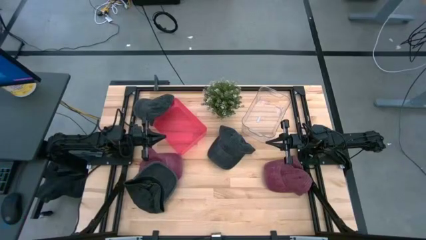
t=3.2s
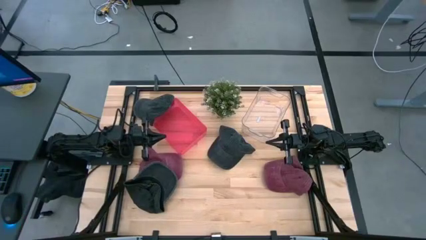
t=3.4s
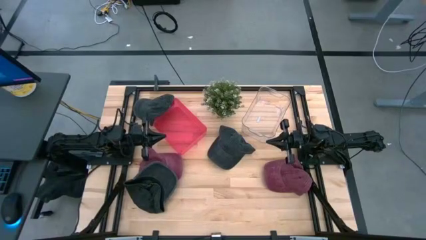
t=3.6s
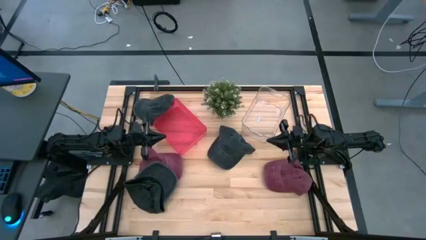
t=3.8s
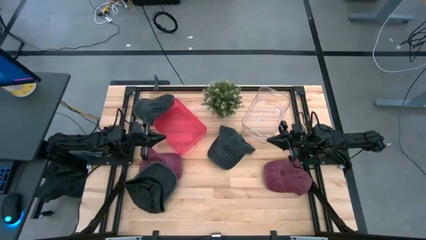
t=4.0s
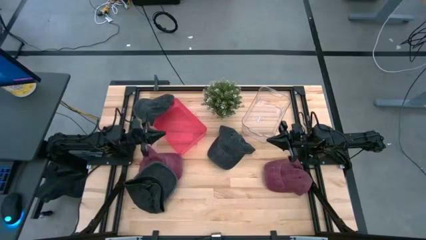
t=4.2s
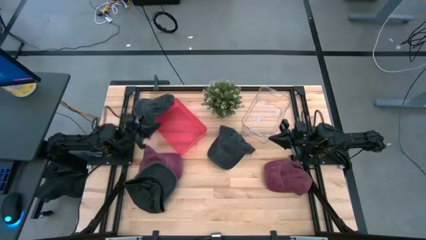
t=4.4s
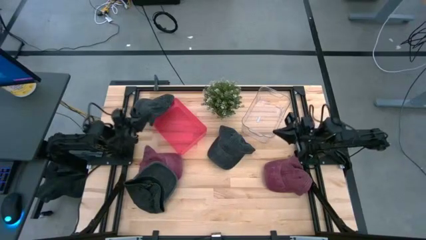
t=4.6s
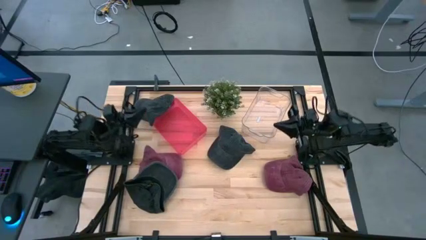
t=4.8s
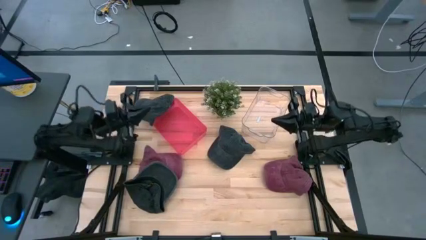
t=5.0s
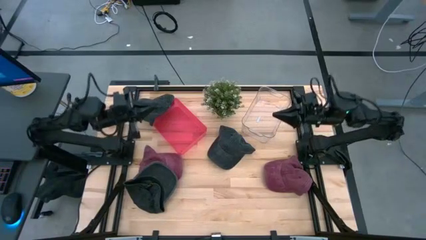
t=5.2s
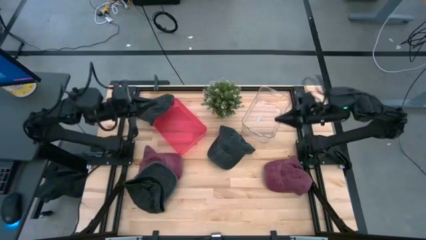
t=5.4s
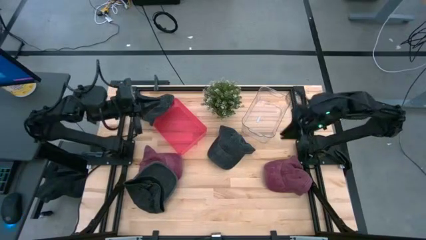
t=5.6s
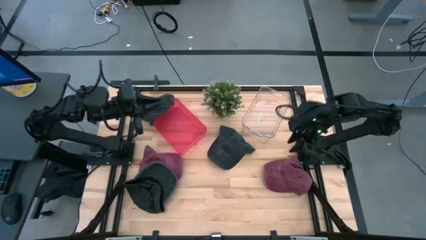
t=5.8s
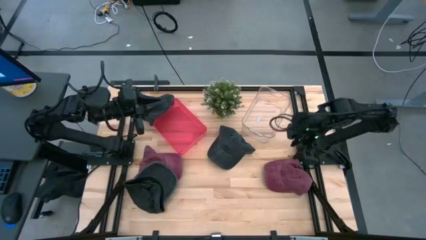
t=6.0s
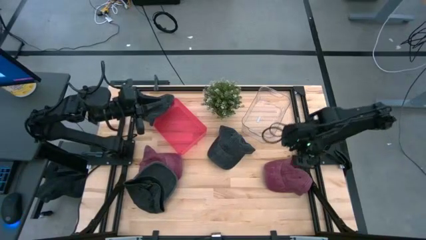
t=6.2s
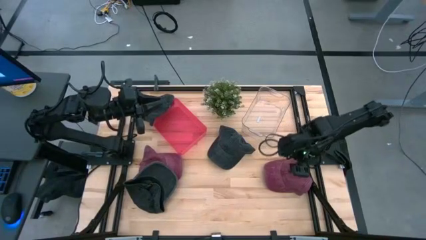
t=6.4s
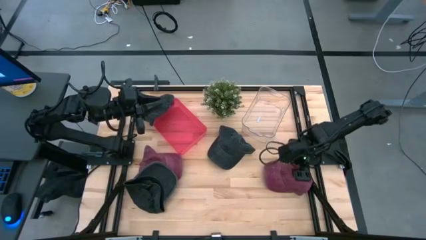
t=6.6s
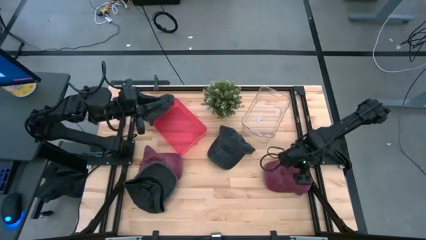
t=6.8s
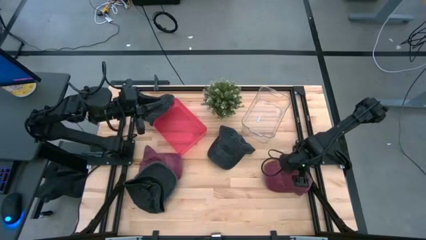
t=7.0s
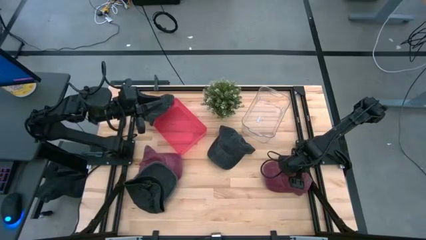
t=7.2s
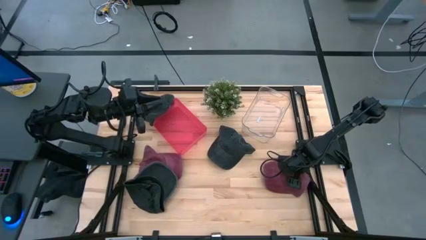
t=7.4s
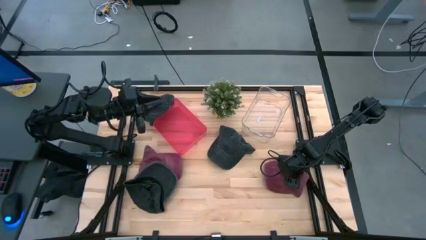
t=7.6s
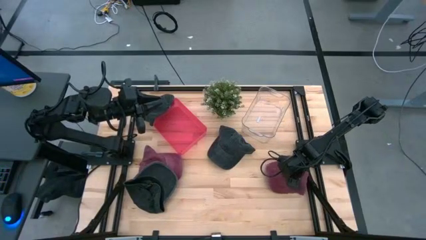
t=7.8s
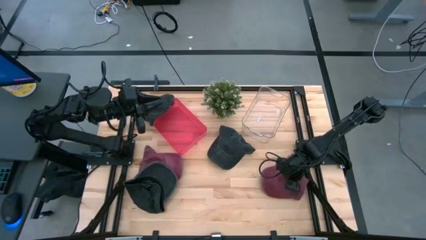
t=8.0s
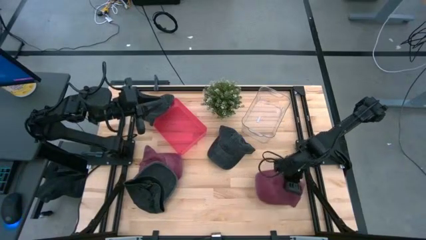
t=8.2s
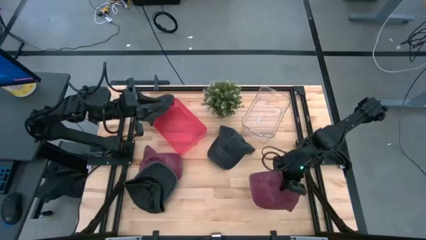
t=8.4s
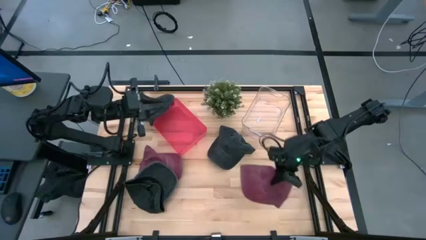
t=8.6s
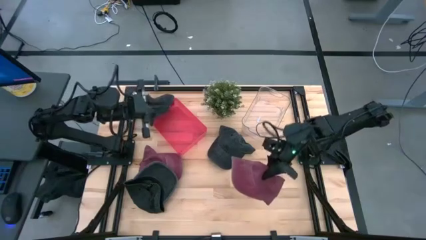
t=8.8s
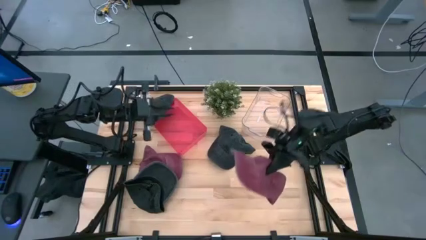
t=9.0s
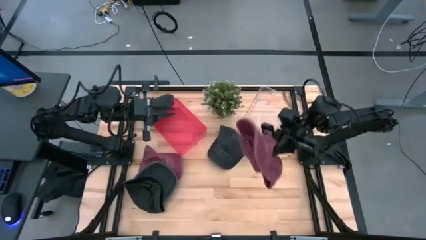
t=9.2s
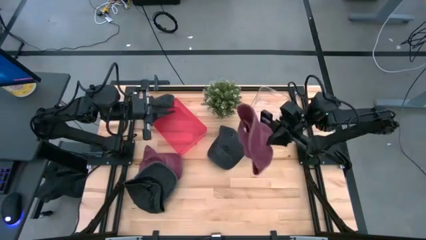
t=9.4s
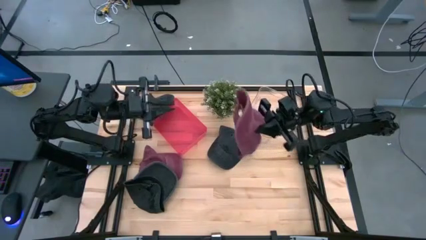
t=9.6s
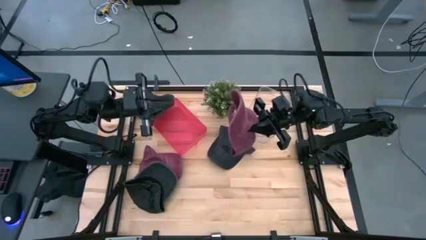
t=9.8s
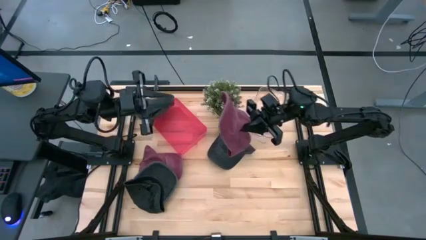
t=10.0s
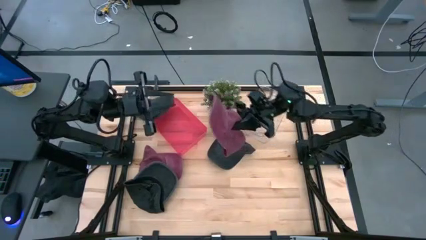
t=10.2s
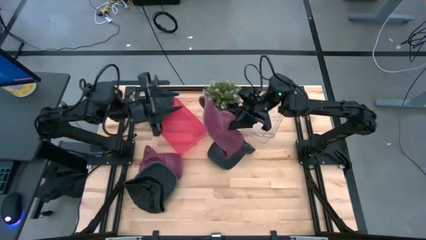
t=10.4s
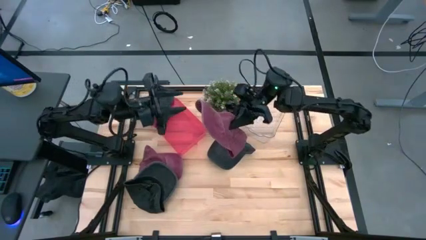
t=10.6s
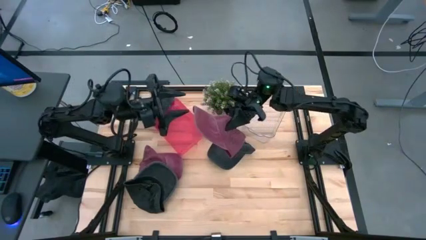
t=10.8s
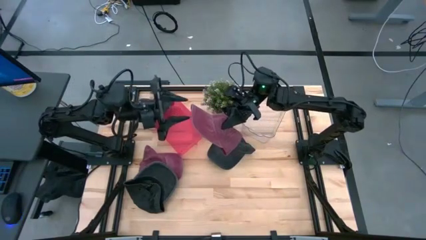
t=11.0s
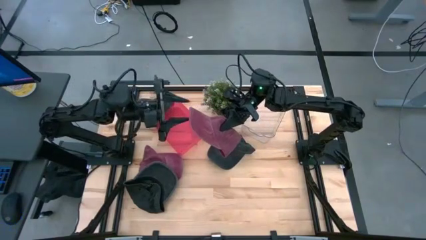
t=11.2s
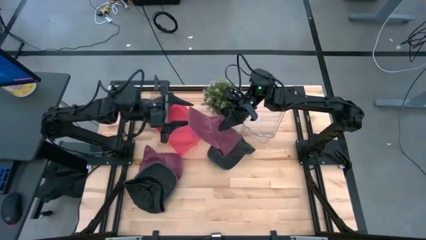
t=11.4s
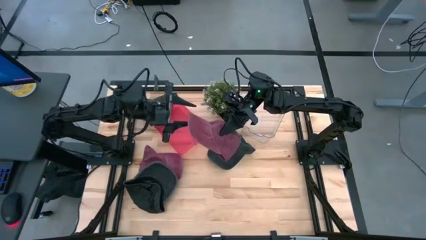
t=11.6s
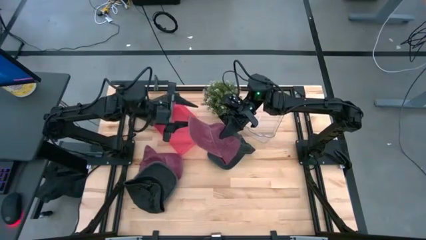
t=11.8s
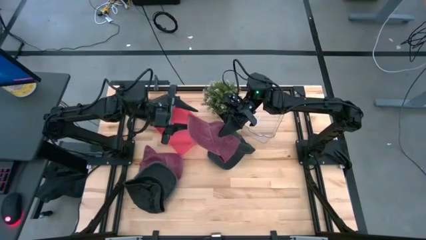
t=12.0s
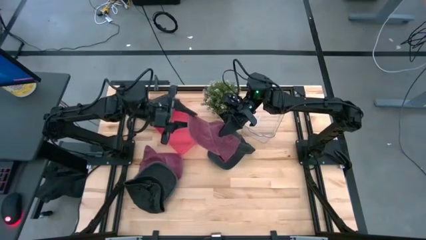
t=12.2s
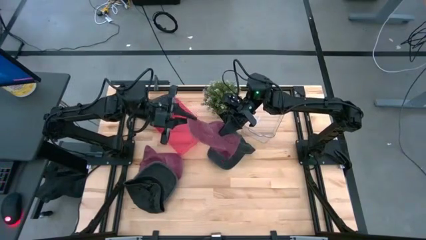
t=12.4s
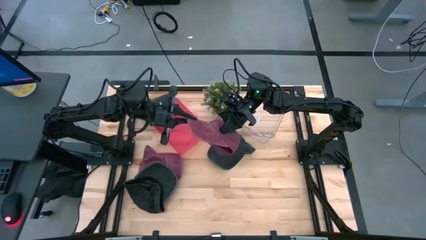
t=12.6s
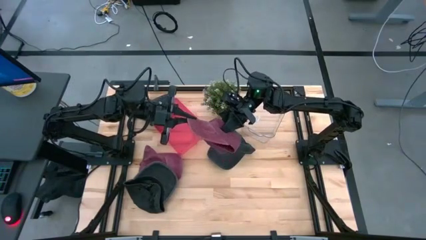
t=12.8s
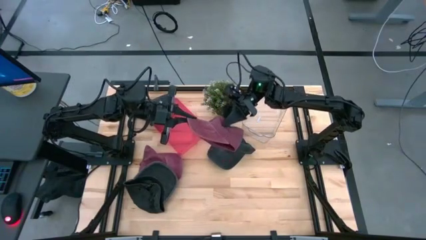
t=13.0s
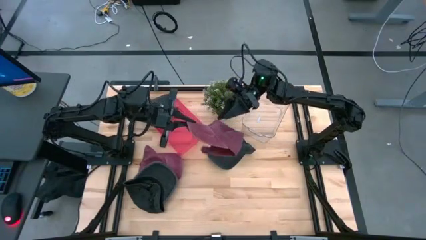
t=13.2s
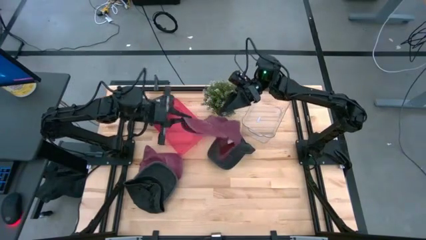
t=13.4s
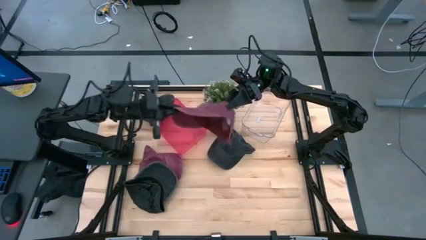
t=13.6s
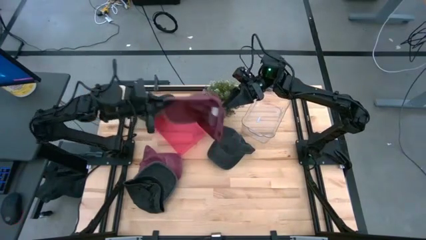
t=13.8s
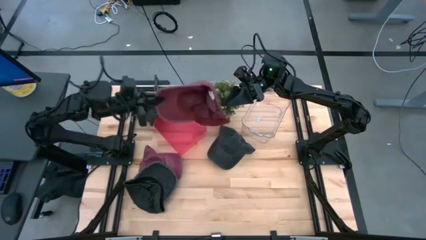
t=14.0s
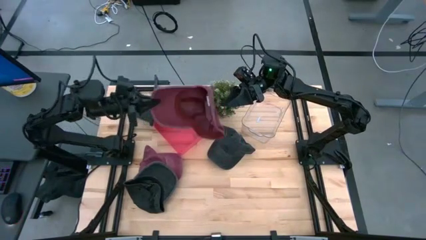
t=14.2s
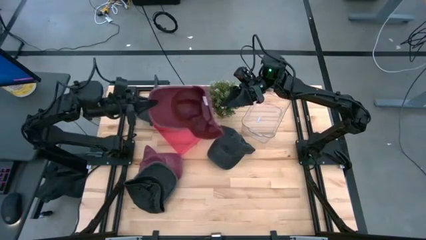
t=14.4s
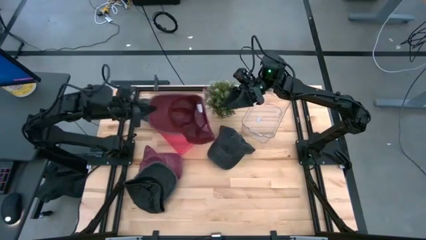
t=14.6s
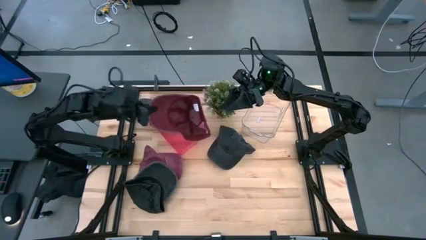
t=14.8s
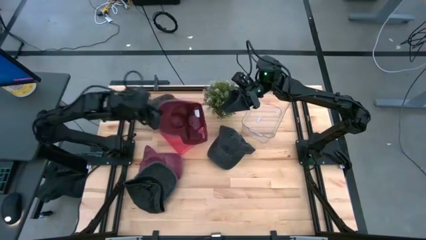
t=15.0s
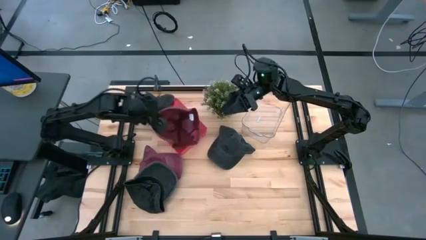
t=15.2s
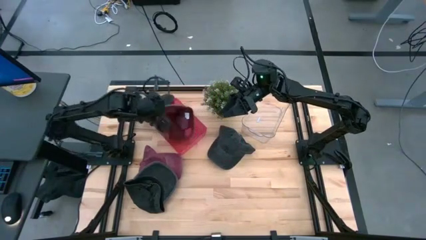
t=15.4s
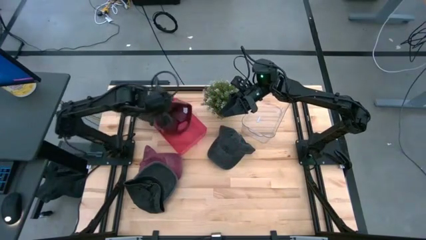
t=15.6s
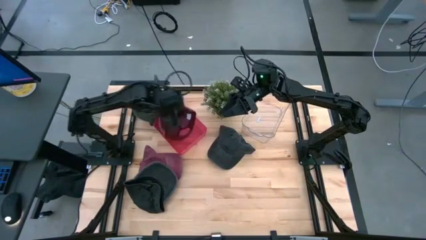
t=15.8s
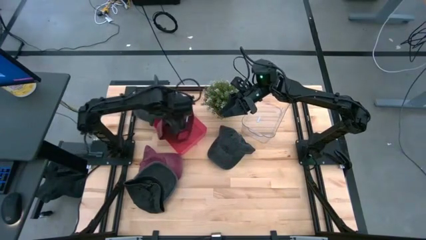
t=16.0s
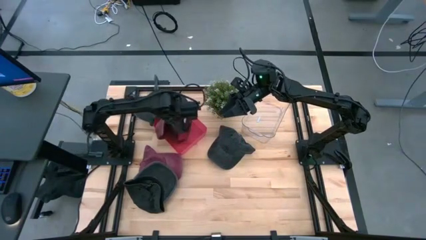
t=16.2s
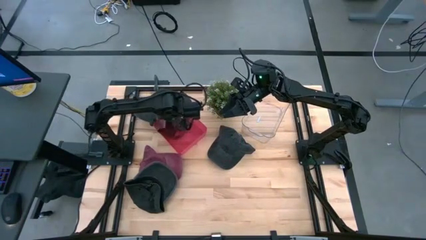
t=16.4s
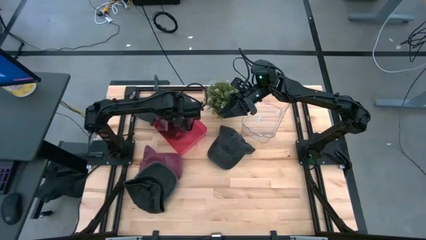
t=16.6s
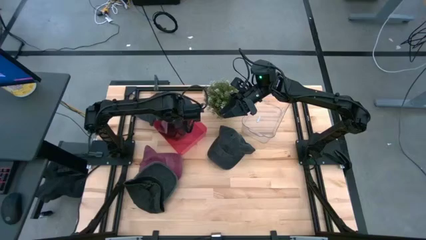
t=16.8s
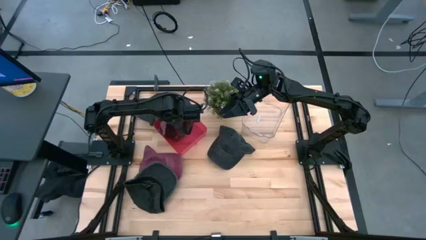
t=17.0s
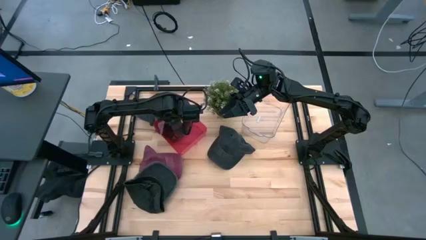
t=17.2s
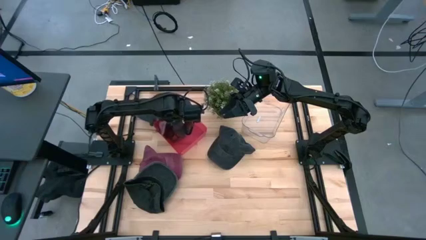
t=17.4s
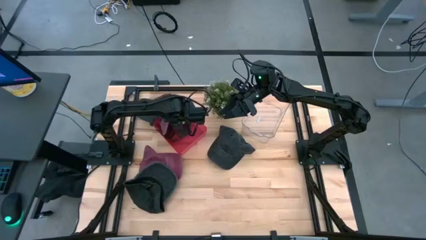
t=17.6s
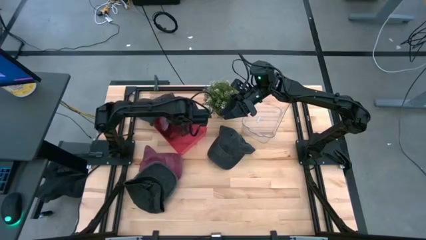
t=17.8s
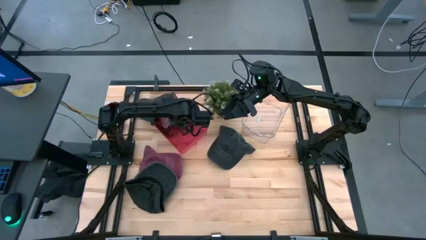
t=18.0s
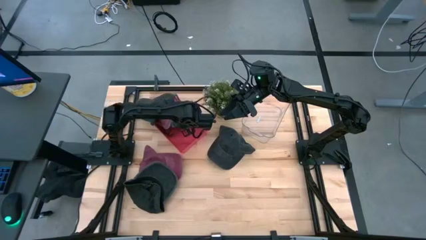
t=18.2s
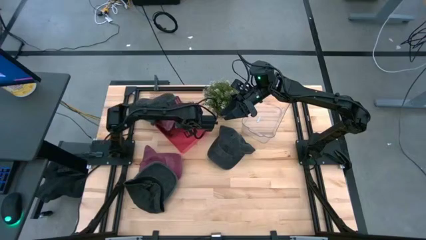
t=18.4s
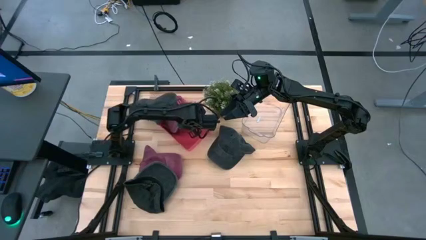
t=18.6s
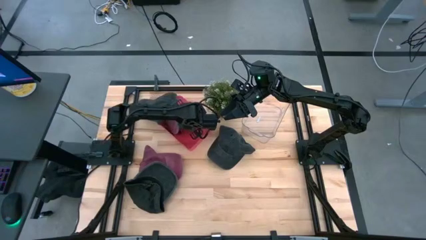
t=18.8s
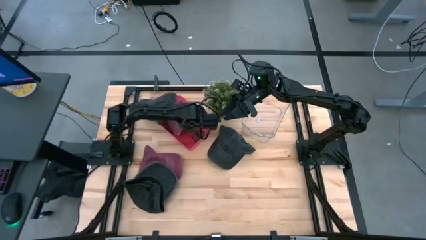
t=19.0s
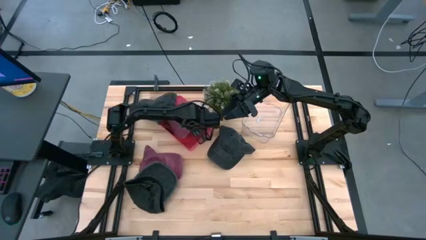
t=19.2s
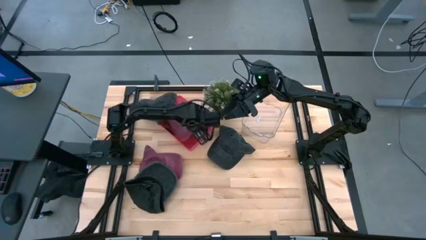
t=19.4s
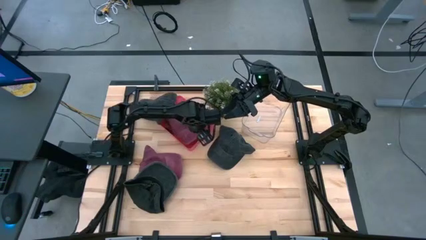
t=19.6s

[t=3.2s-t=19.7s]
Task: Pick & Place hat
Put the right red cap into the red bin
